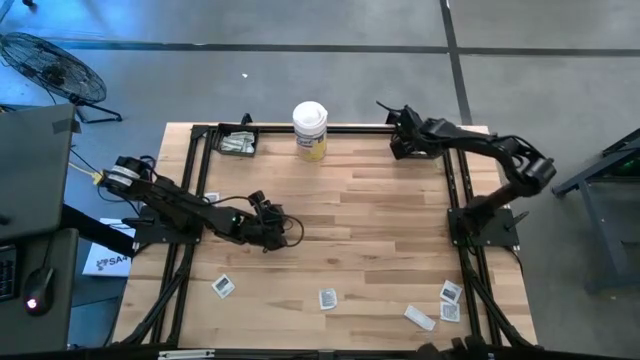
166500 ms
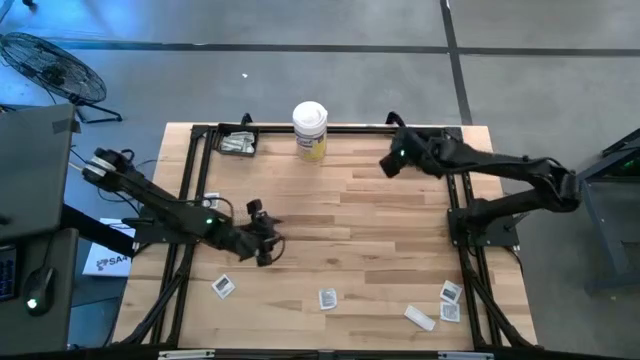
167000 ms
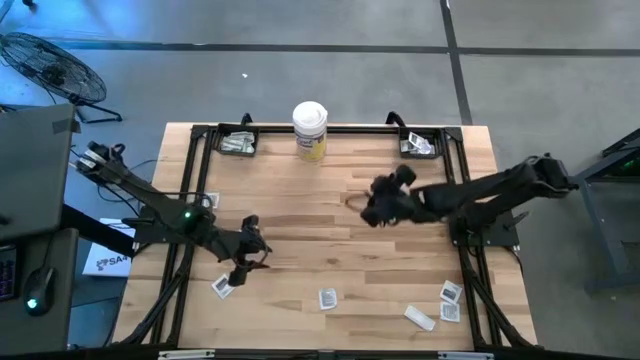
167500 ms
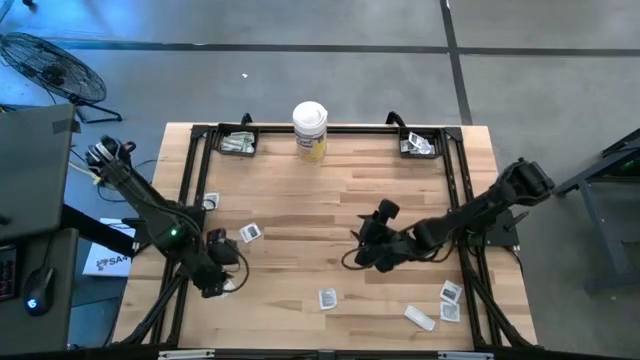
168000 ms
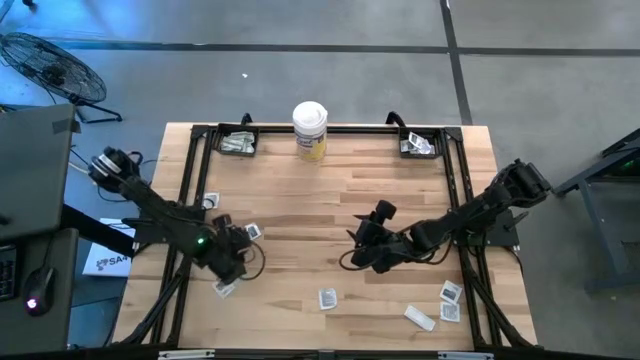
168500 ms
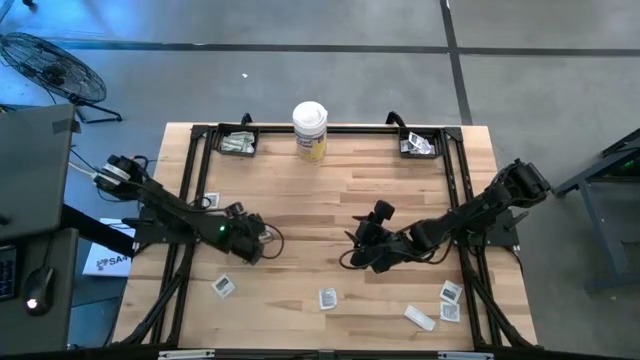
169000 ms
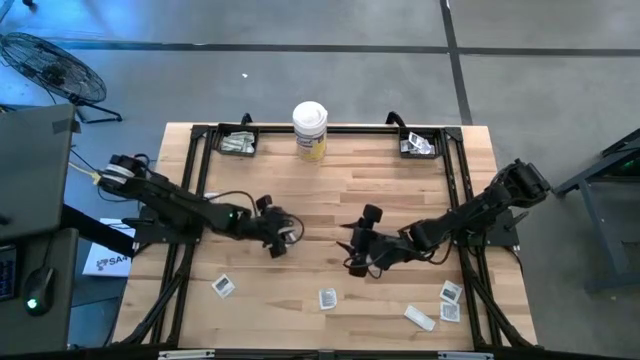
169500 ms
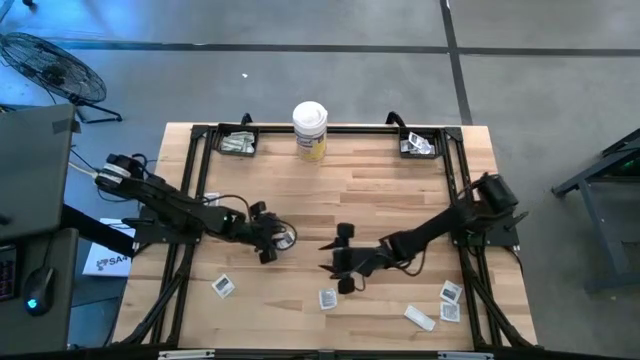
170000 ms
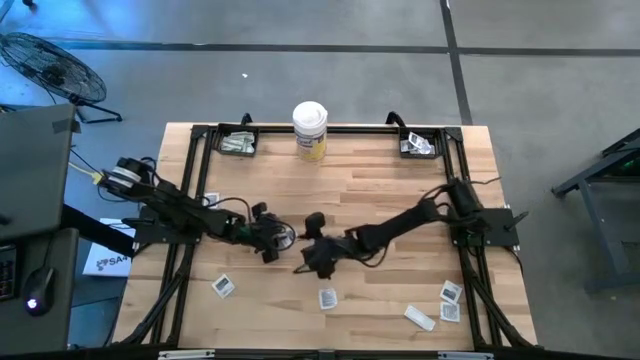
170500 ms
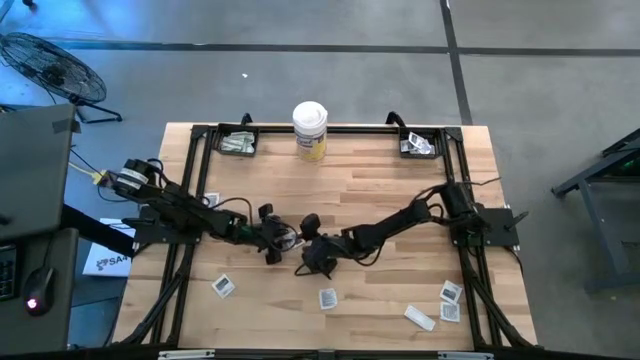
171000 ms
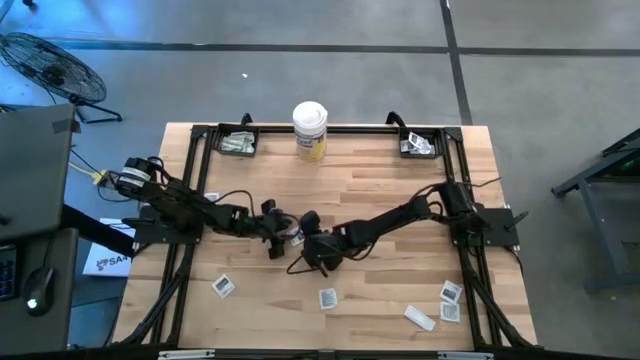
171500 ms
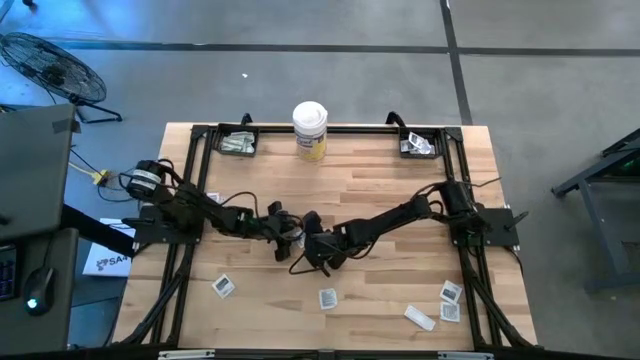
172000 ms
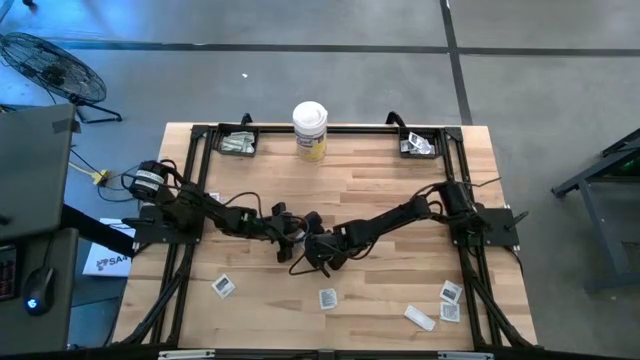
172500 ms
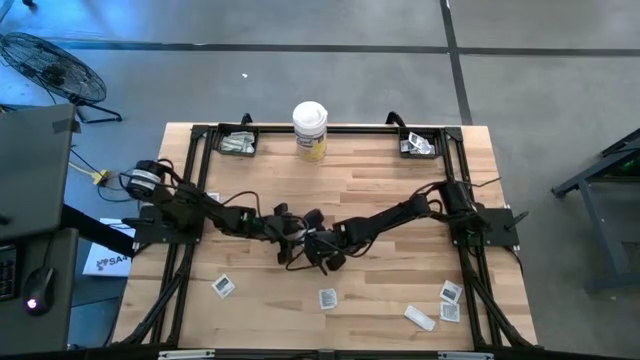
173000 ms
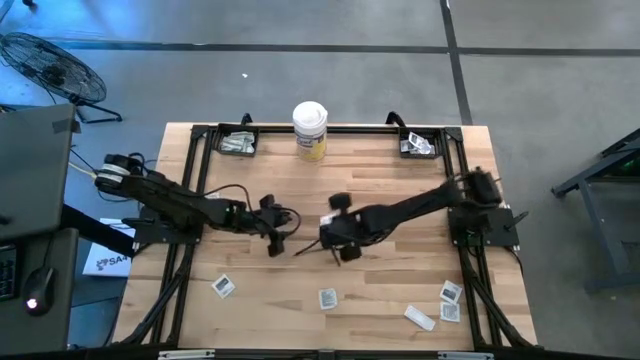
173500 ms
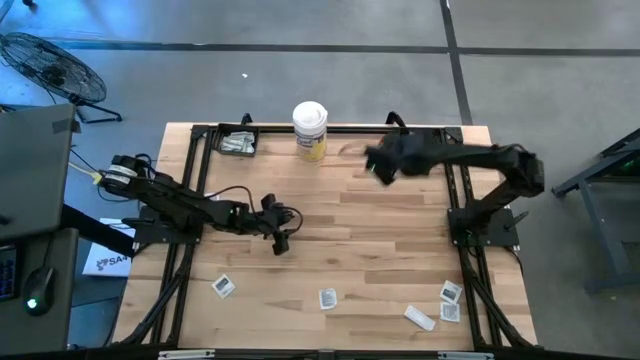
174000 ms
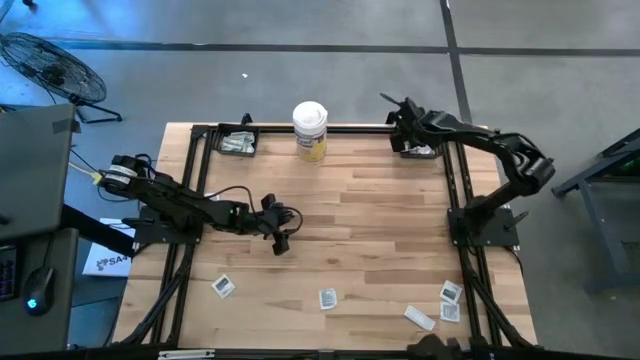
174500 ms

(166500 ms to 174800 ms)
Task: Pick & Place First Aid Supplies
Put the black towelette pack into the right black basket

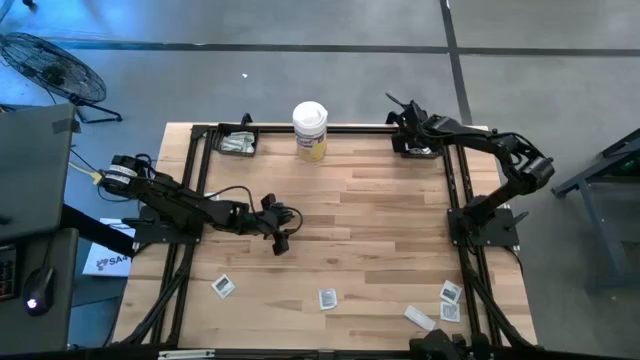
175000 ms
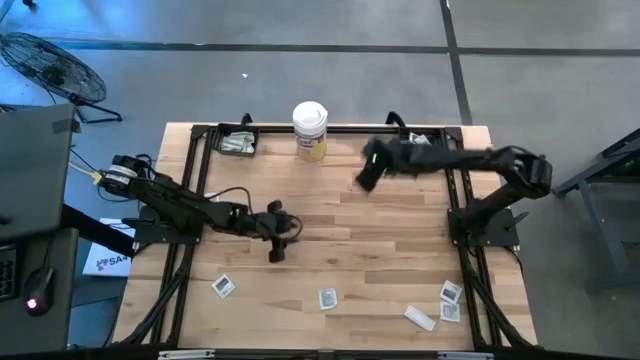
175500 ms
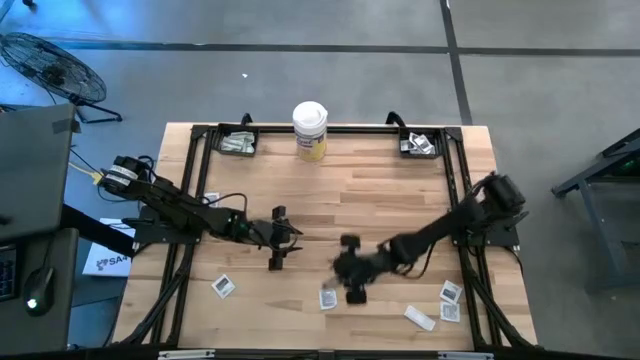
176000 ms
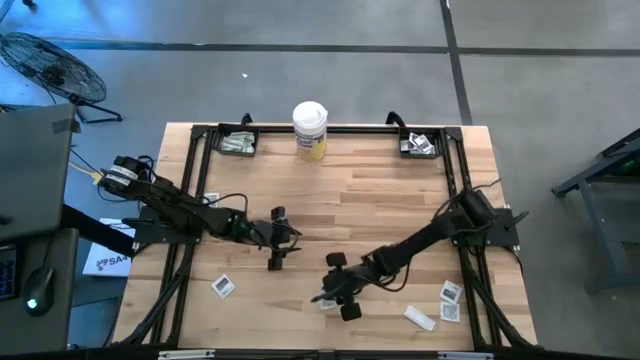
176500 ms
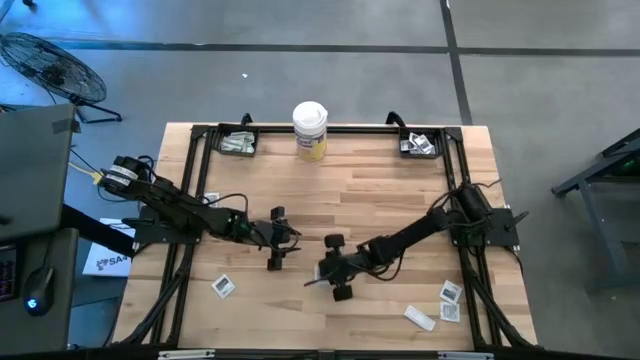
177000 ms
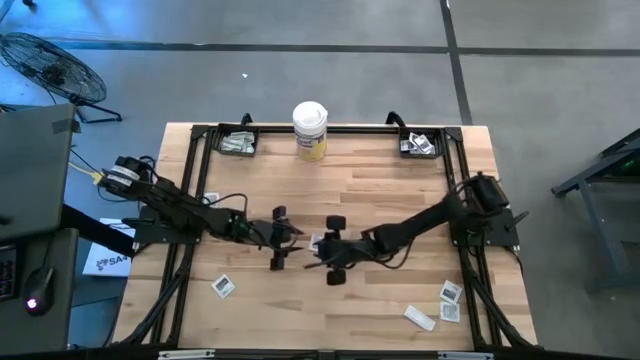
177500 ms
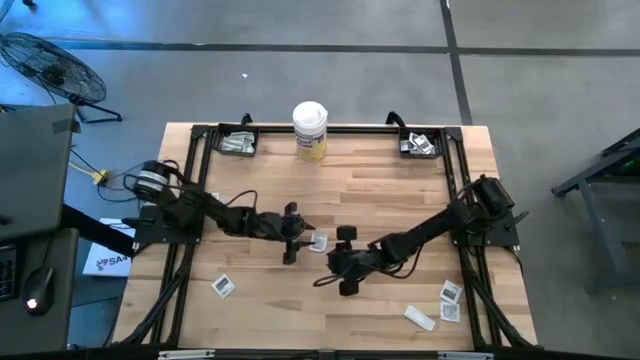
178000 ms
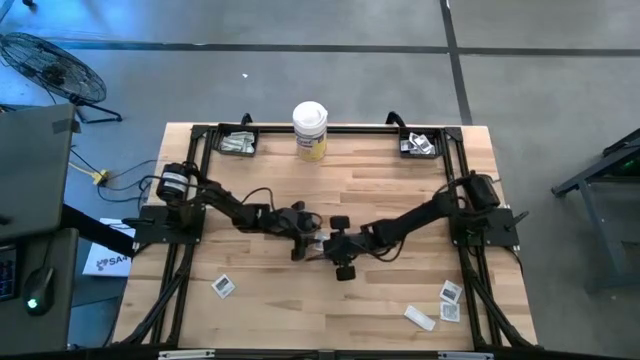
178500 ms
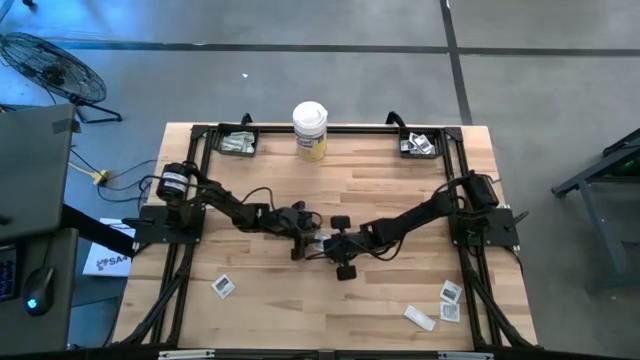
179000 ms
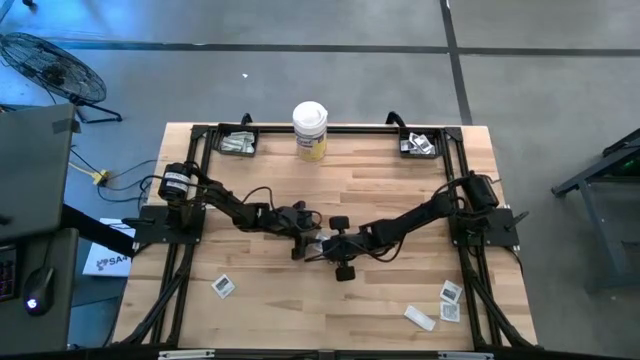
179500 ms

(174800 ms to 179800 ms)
Put the black towelette pack into the right black basket

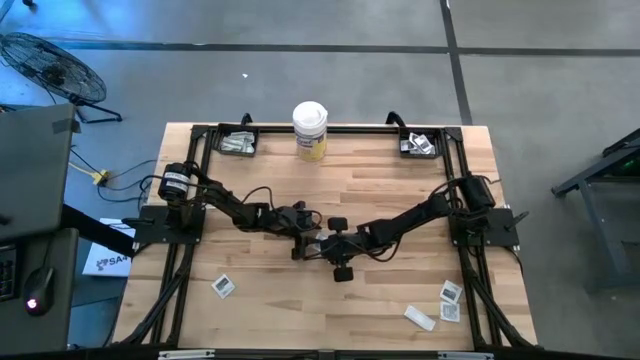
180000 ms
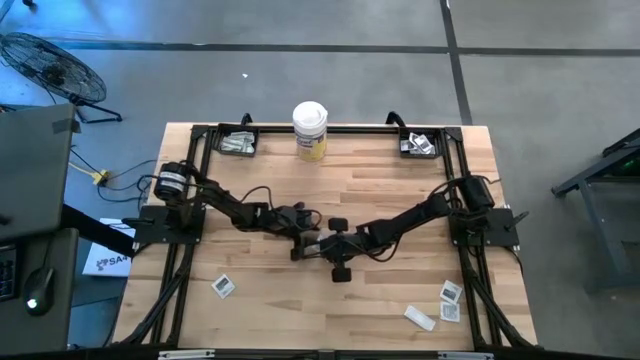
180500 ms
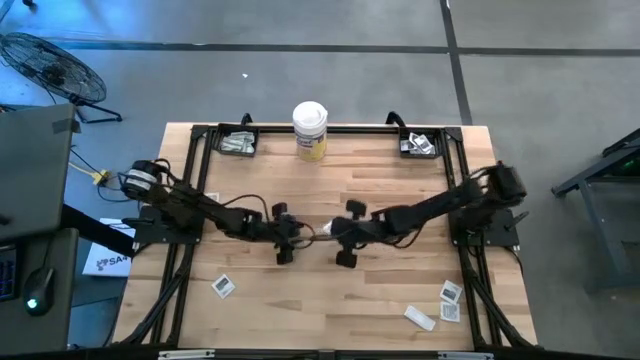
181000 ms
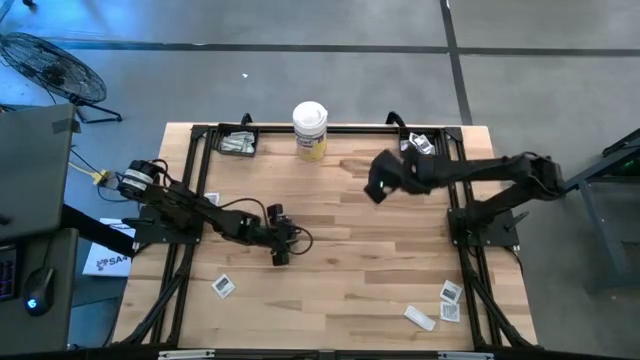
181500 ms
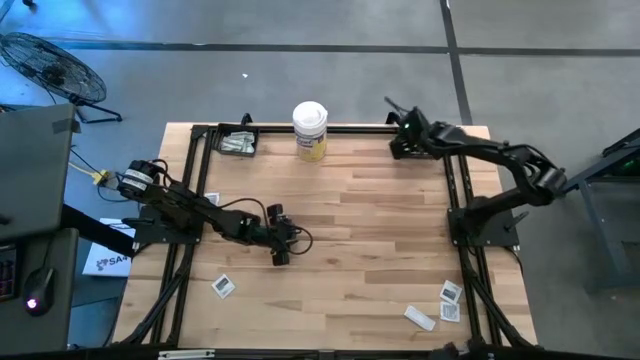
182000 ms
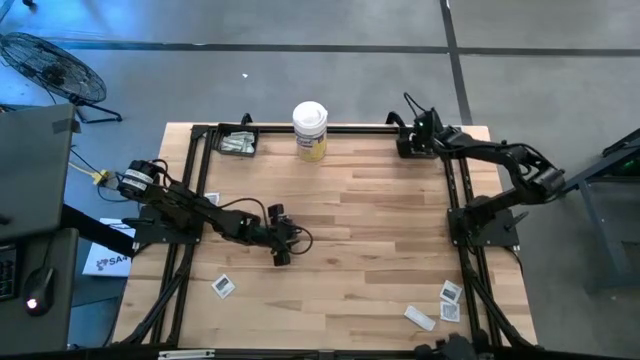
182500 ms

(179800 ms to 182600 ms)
Put the black towelette pack into the right black basket

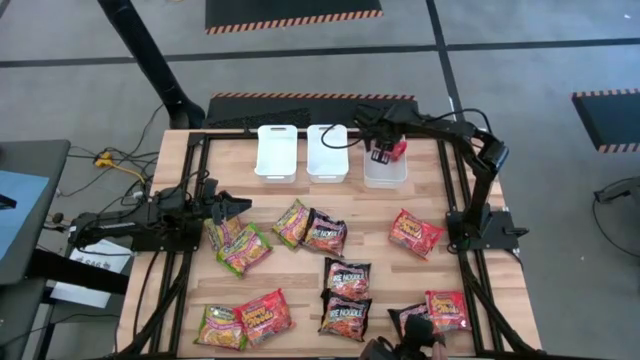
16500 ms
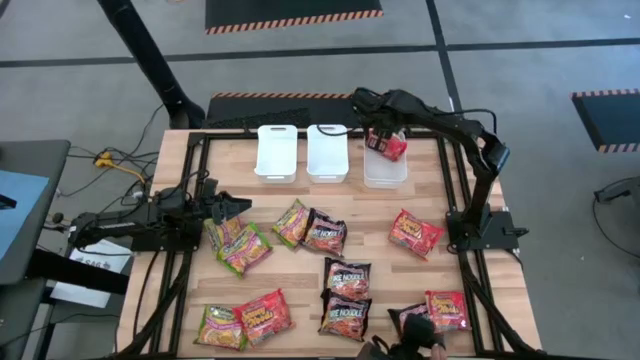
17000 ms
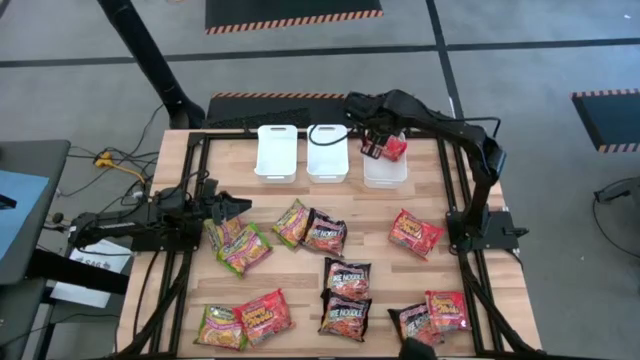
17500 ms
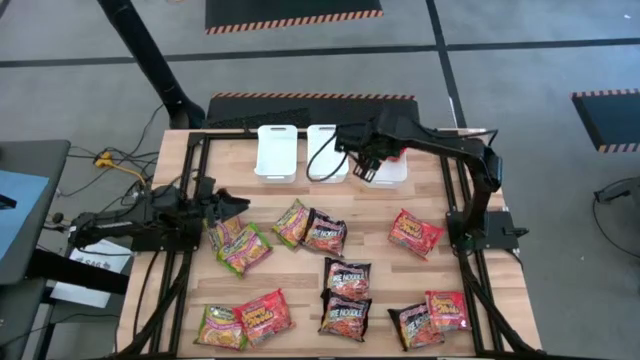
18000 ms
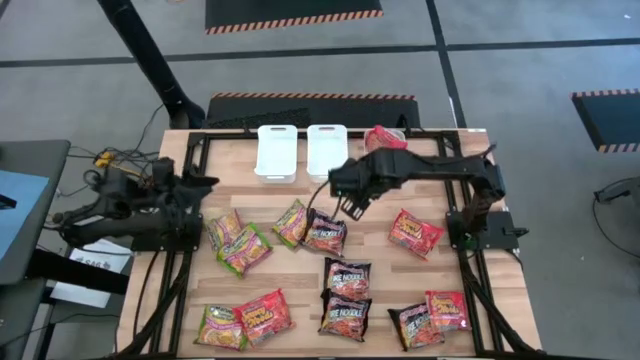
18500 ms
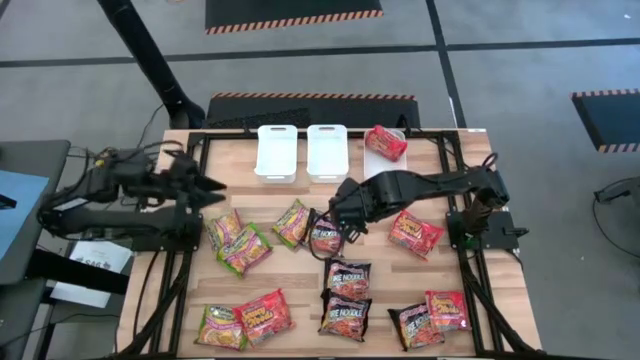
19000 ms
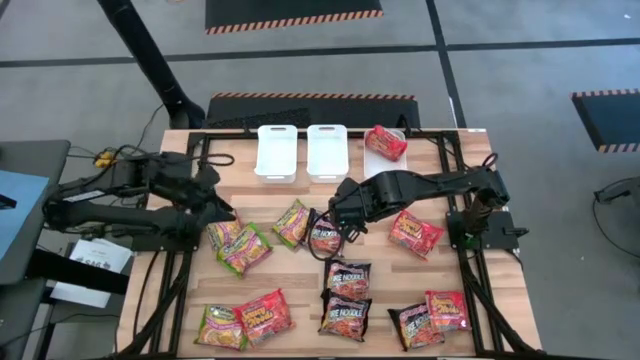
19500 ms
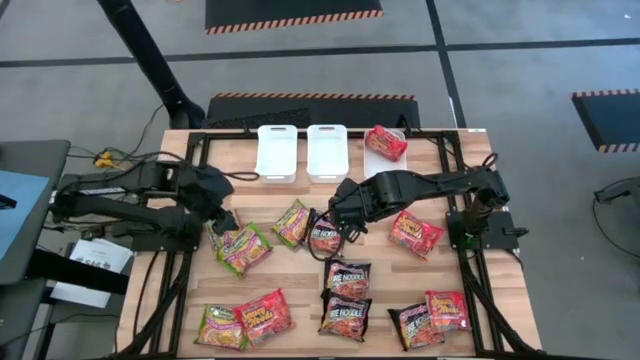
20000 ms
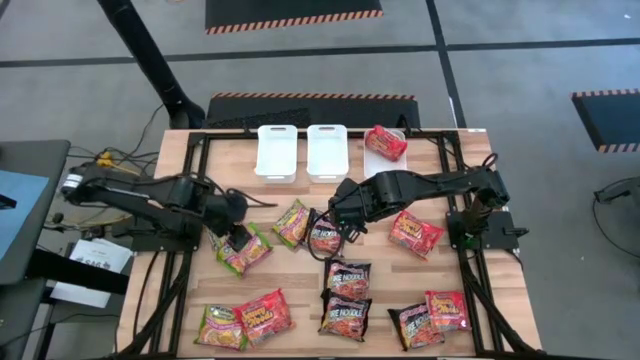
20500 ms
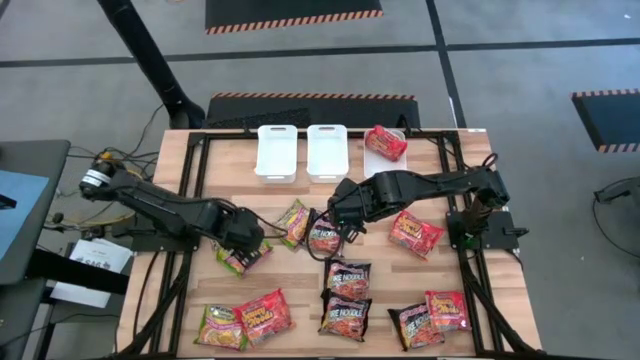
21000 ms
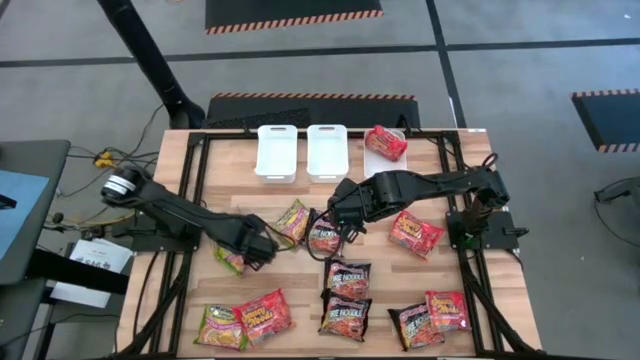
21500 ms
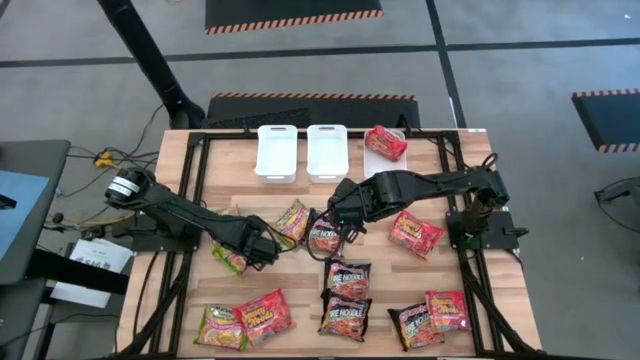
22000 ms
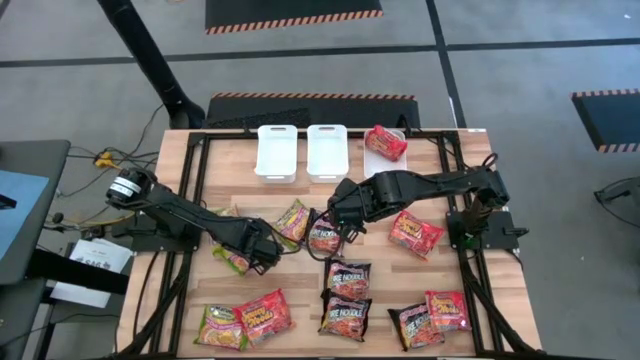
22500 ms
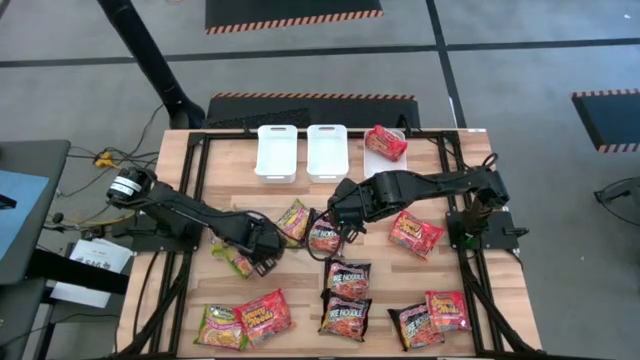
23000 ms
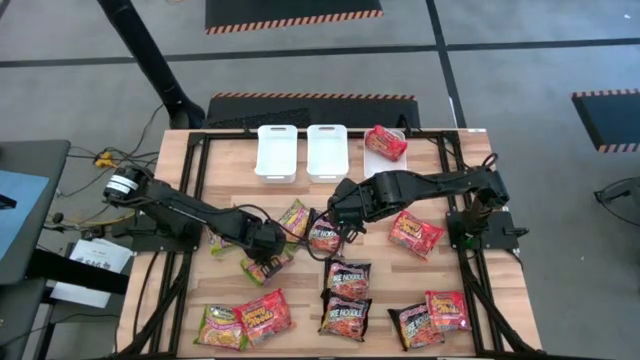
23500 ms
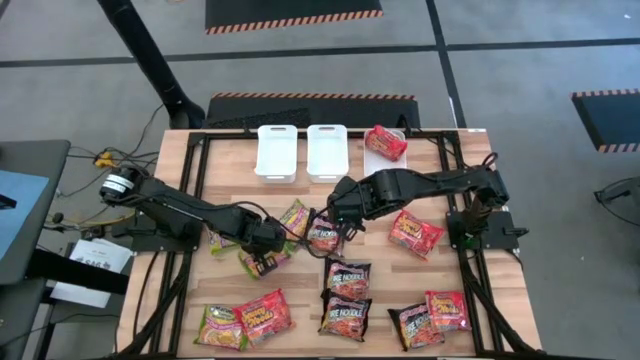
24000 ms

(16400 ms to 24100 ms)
Task: Sort Maruchan noodles
Put the green noodle pack into the left white bin
